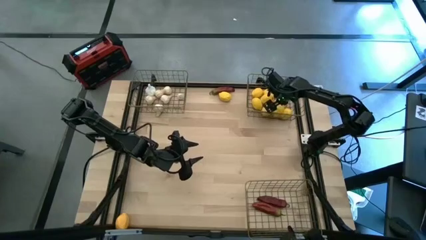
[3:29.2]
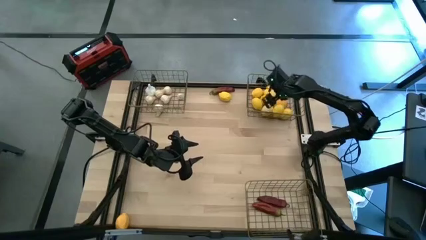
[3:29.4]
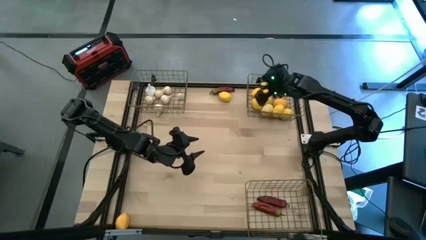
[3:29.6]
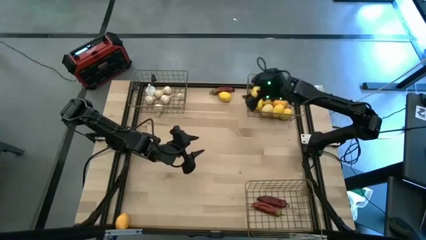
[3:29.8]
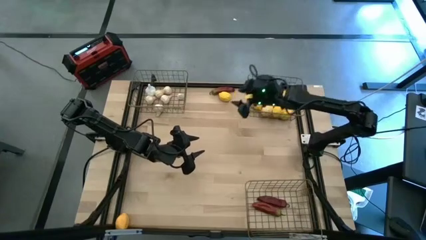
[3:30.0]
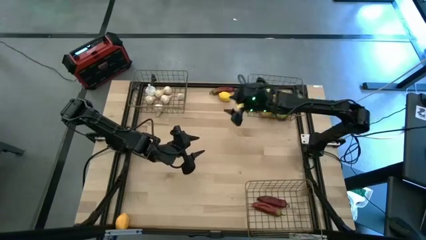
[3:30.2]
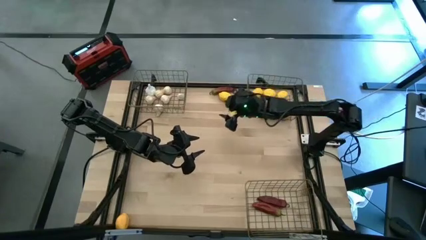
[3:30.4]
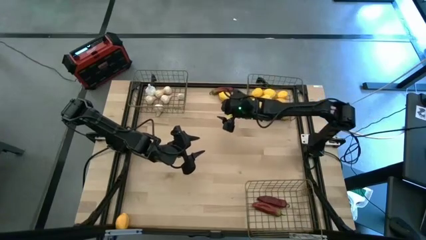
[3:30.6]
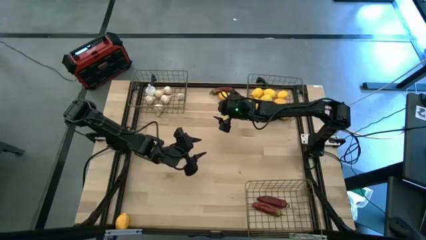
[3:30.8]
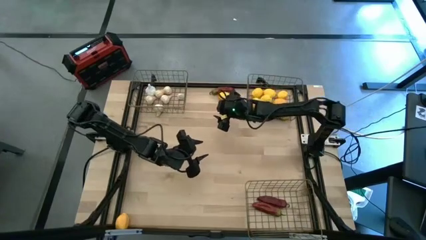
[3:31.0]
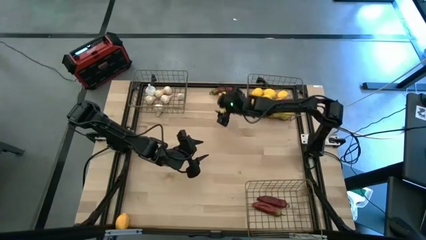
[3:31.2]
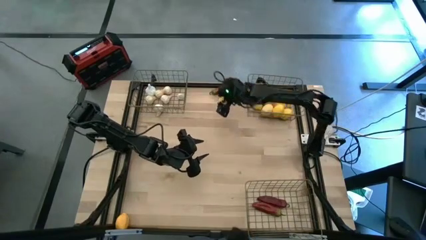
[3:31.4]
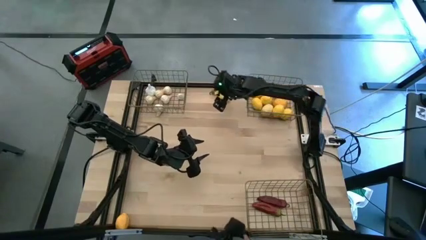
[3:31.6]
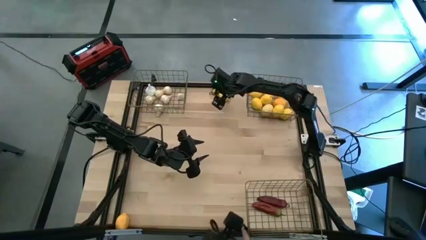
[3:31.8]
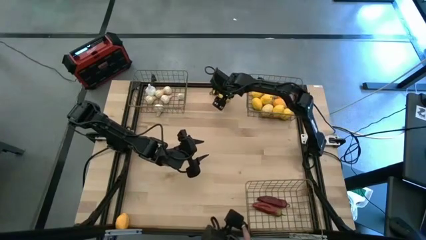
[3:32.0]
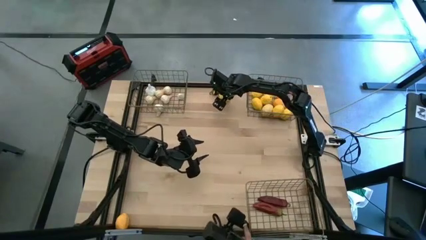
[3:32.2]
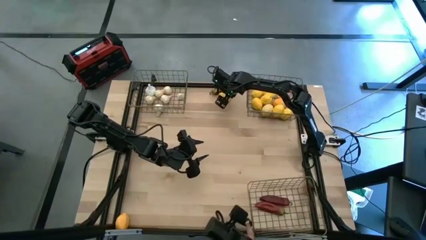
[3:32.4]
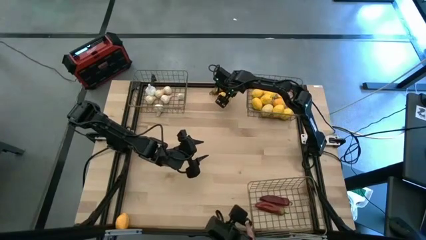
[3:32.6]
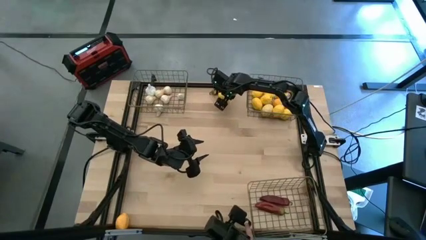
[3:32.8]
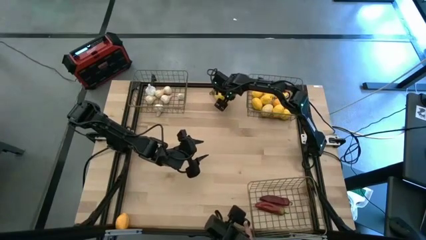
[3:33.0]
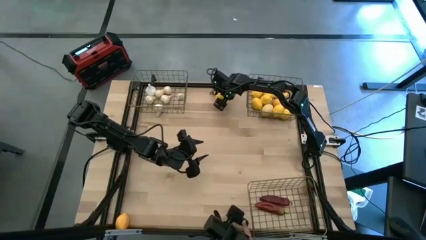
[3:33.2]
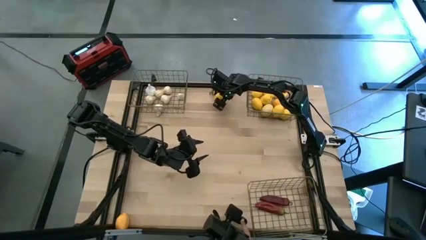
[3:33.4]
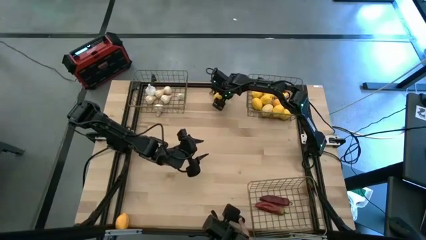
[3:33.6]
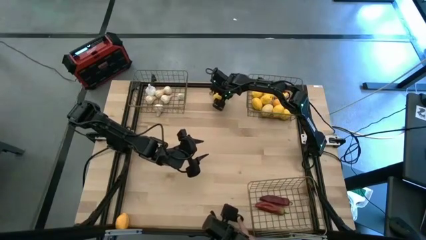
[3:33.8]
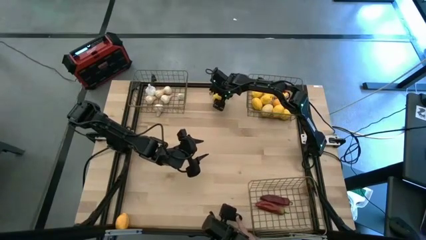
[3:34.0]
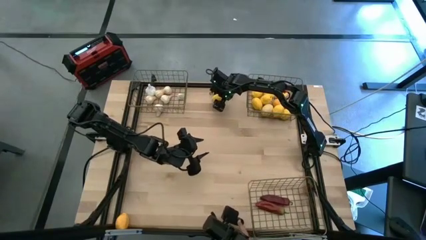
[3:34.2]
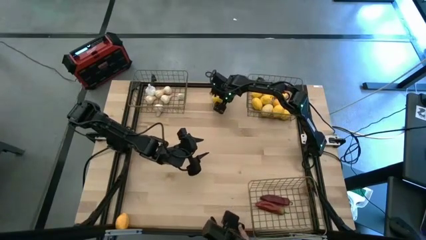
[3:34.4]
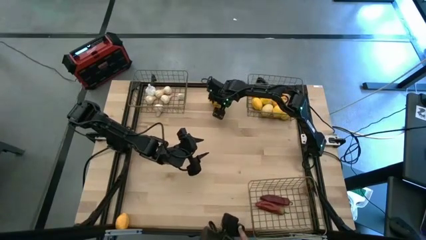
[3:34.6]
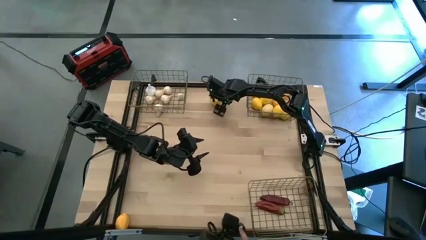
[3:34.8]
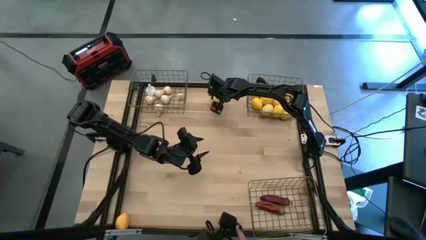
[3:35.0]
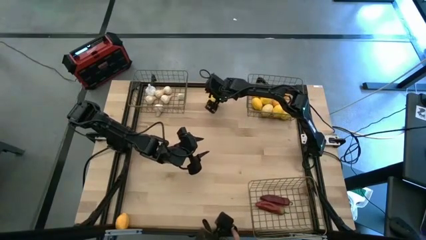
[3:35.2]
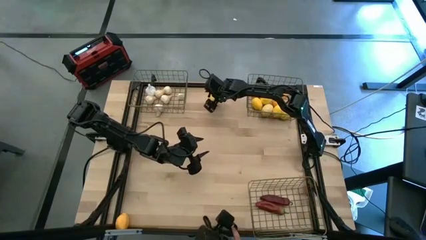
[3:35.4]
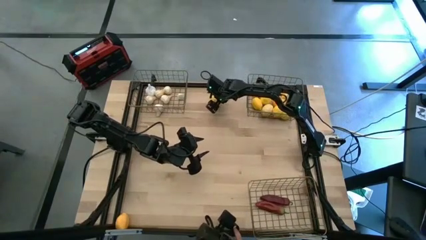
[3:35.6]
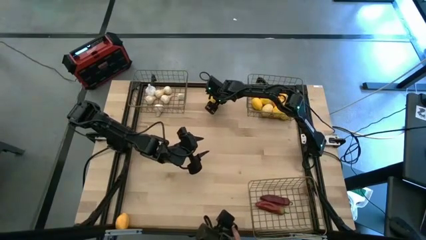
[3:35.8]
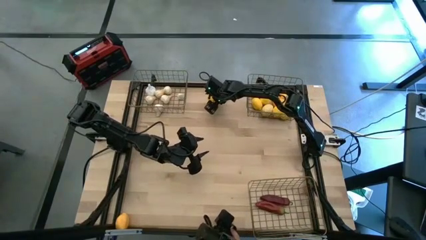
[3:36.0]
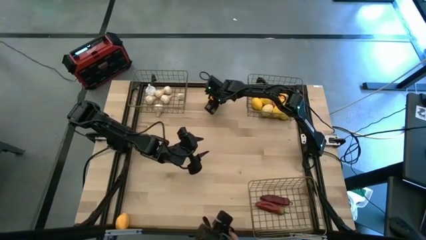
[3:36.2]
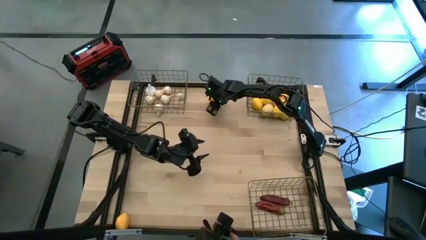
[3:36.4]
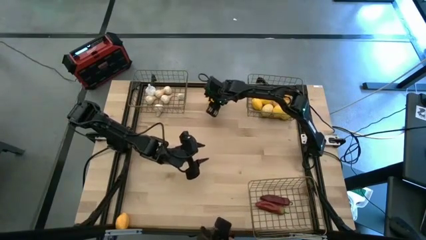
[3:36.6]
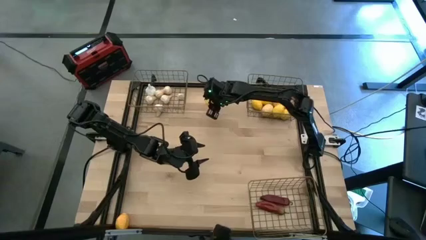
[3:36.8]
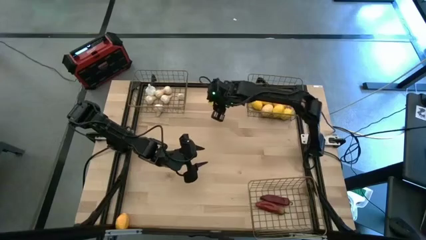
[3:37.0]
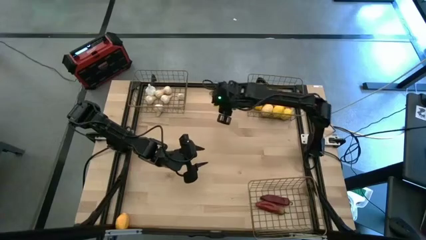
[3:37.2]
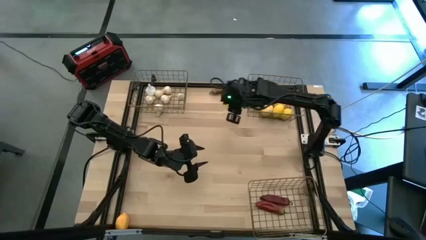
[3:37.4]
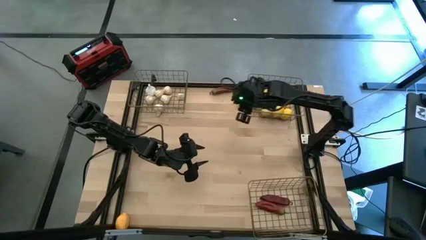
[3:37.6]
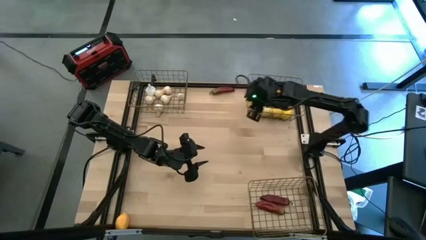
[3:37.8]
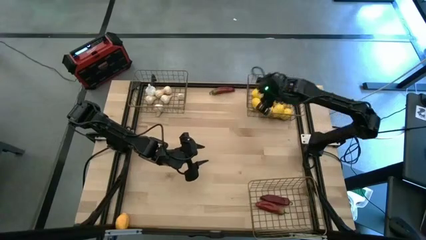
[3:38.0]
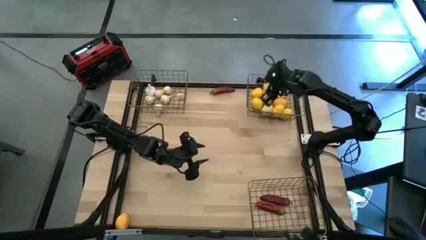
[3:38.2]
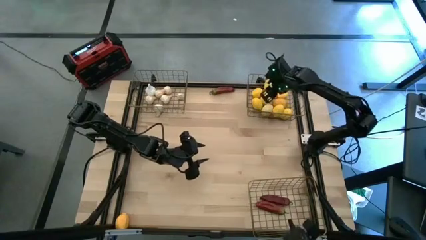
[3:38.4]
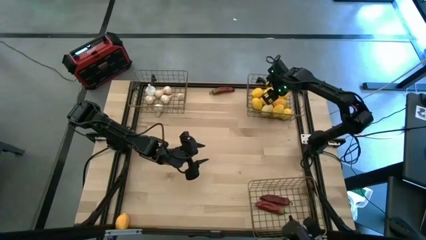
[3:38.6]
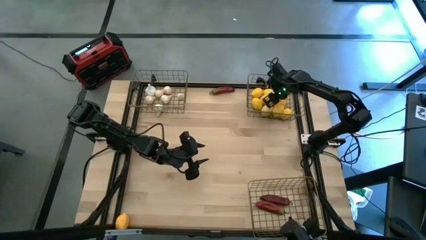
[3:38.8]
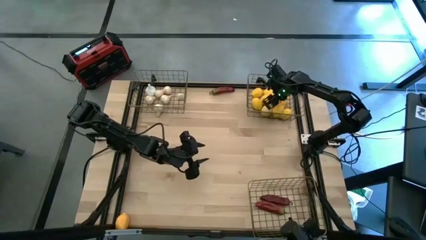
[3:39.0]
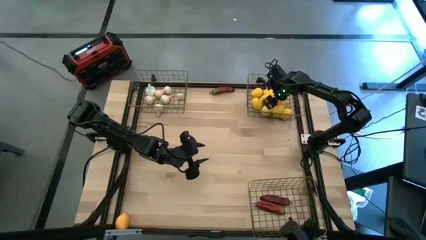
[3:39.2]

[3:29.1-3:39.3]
Task: Sort produce into baskets
Put the top yellow lemon into the top right wire basket

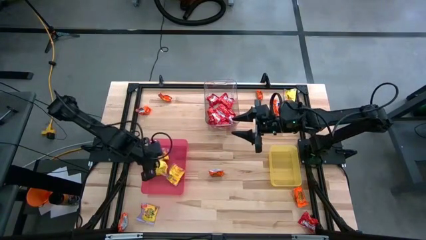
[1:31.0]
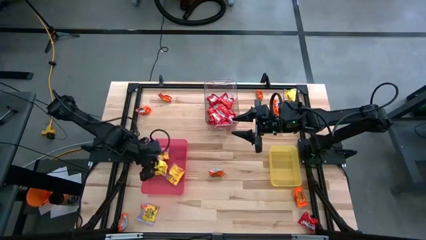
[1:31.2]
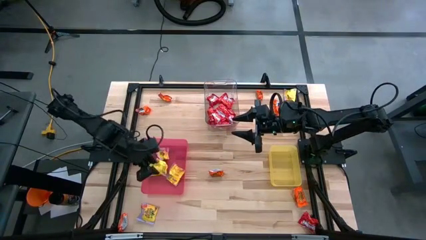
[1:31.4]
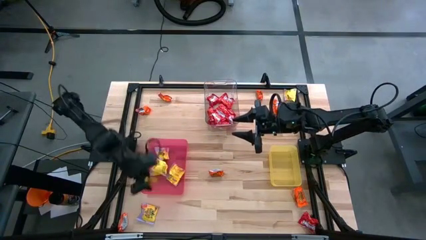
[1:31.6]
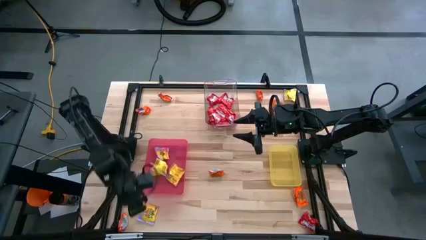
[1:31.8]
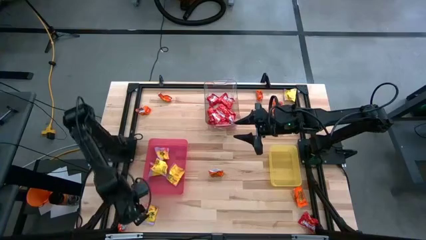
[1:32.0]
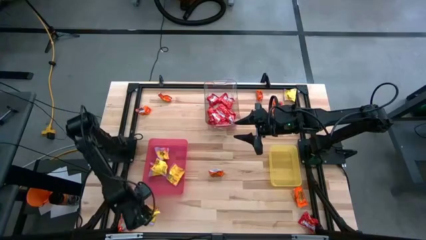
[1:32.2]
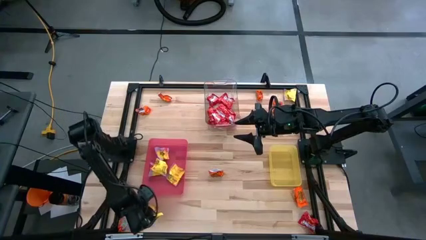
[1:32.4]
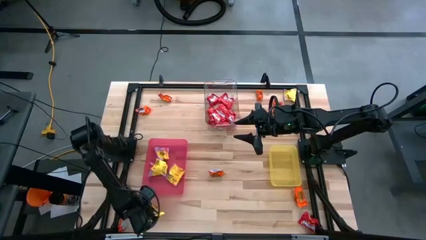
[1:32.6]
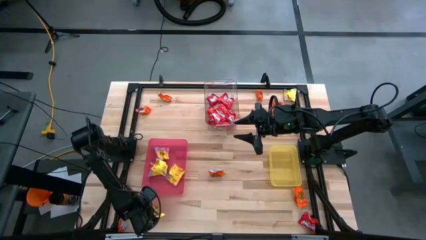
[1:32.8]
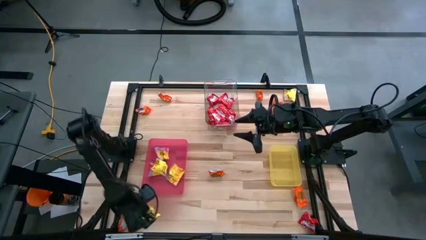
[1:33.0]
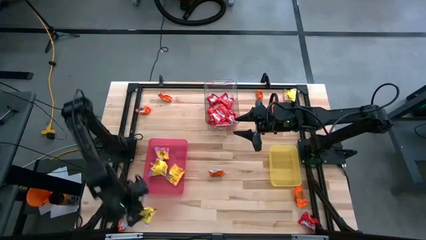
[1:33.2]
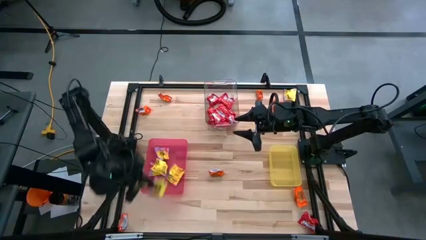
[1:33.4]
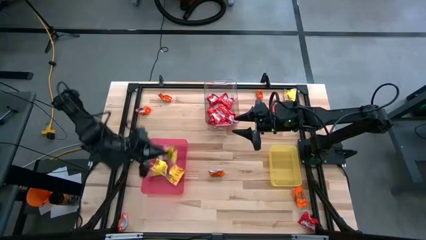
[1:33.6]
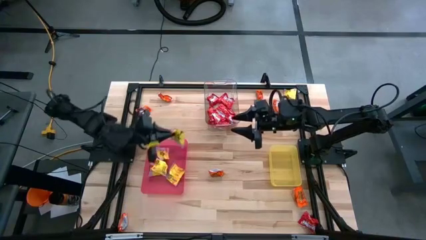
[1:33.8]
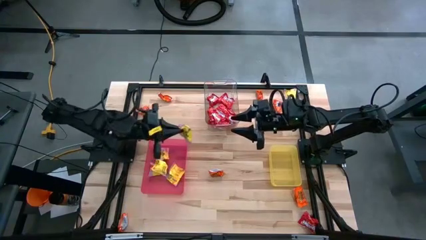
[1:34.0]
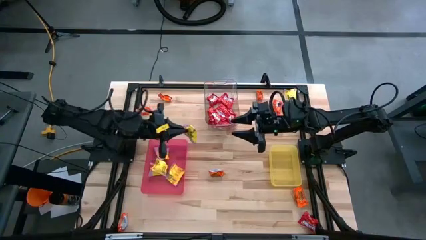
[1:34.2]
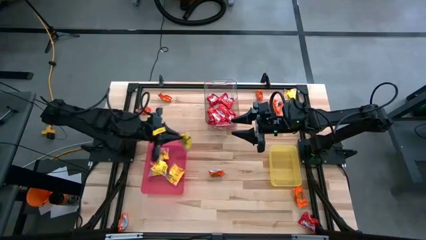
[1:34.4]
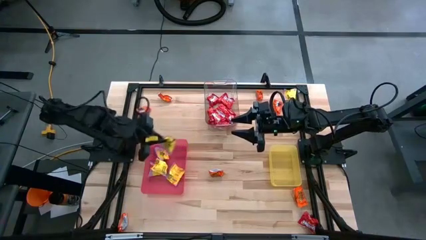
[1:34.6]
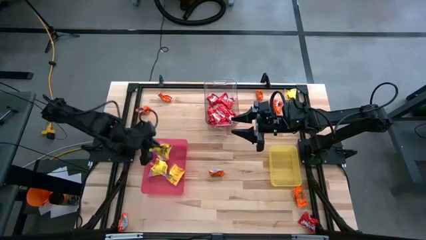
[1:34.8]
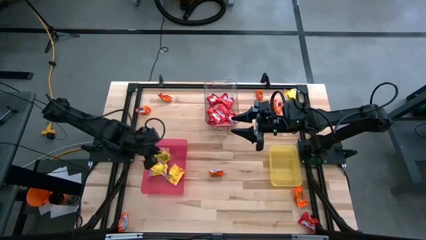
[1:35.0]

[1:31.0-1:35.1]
Task: Sort candy
Put the yellow candy into the pink bin
